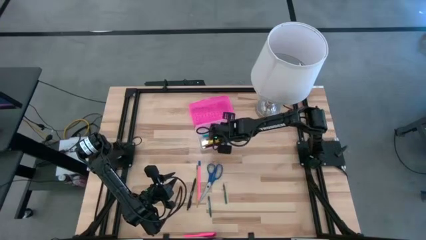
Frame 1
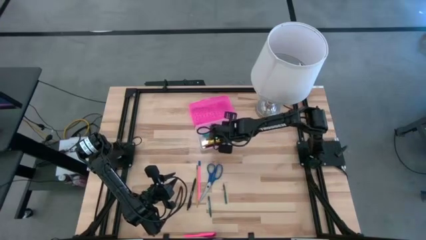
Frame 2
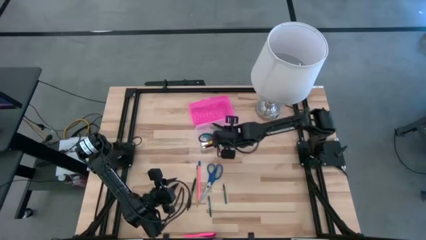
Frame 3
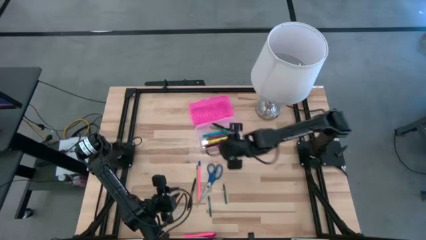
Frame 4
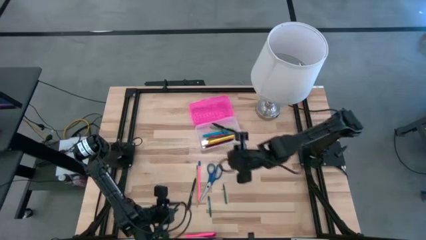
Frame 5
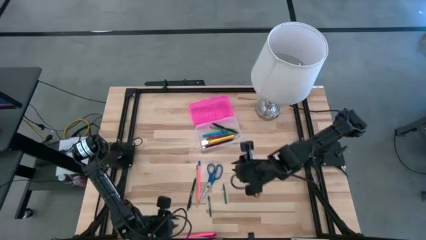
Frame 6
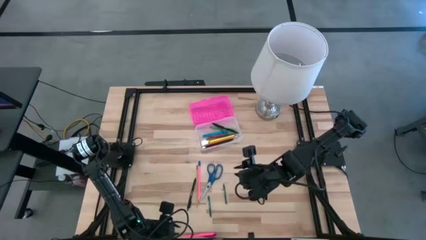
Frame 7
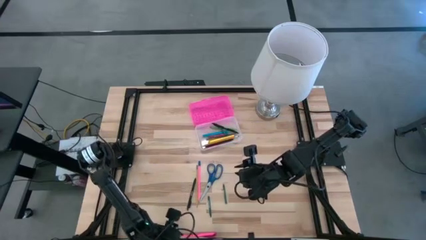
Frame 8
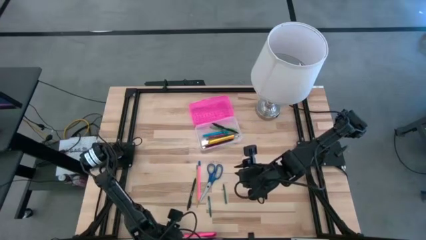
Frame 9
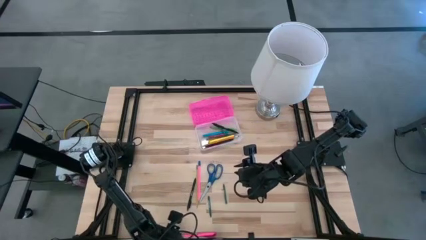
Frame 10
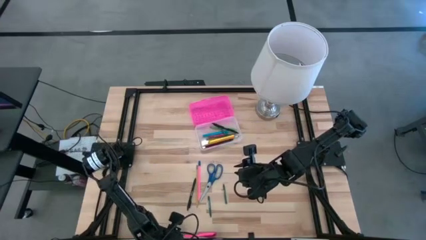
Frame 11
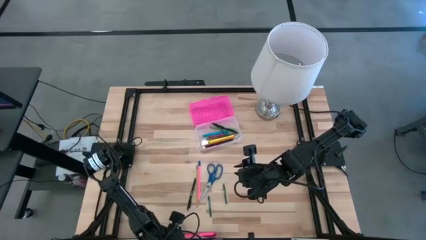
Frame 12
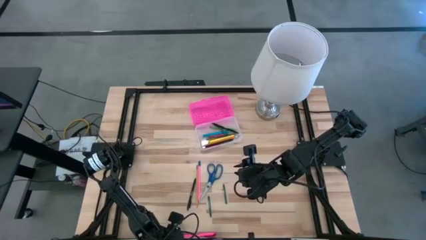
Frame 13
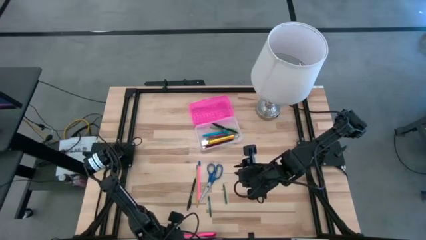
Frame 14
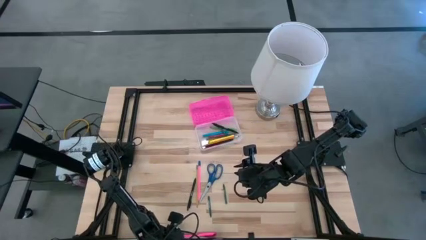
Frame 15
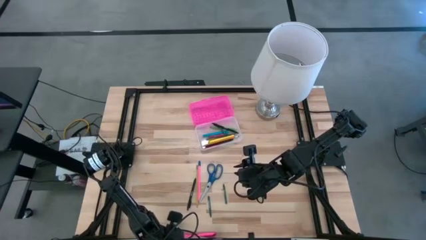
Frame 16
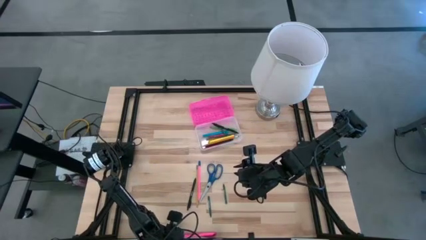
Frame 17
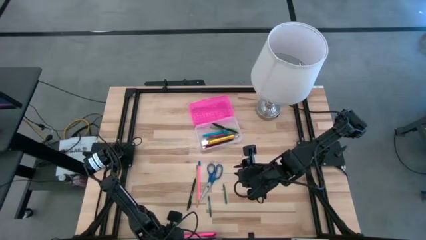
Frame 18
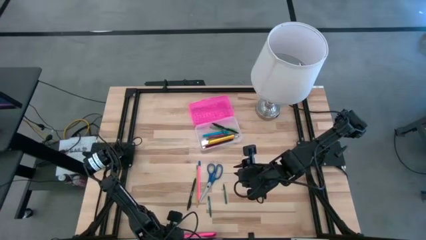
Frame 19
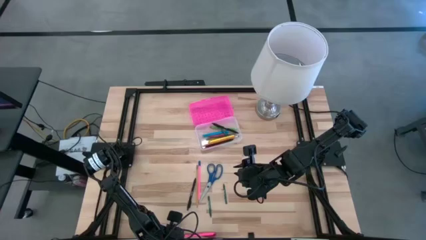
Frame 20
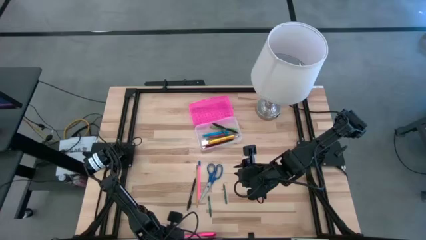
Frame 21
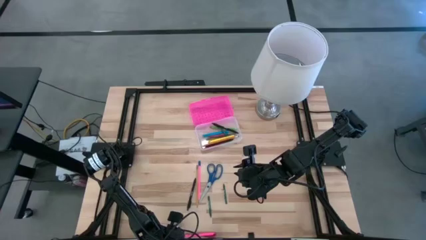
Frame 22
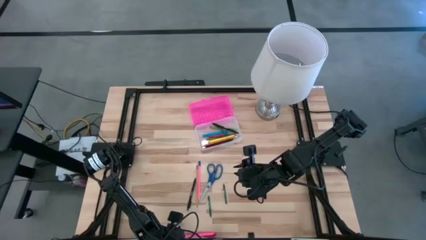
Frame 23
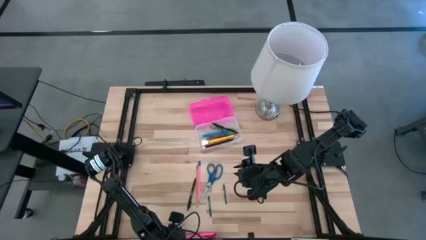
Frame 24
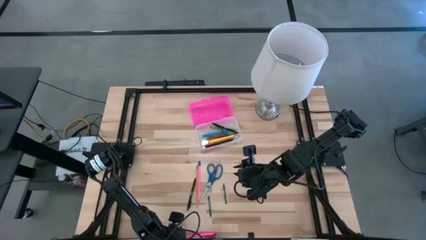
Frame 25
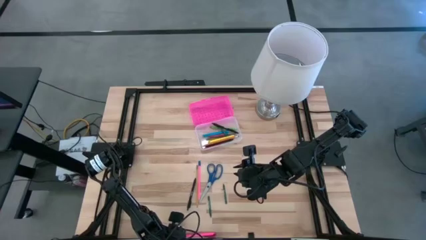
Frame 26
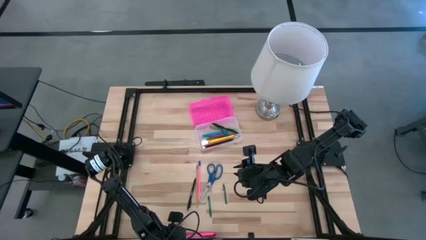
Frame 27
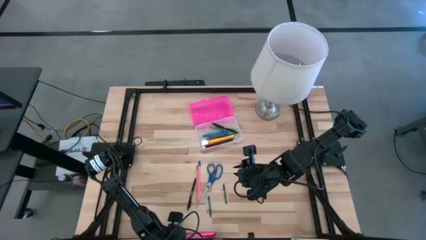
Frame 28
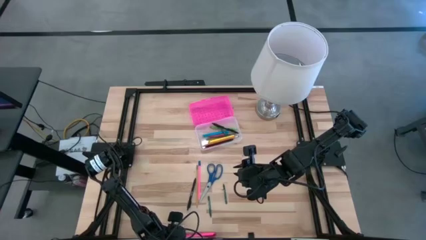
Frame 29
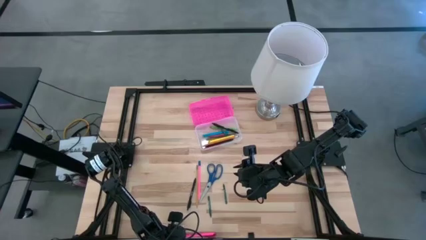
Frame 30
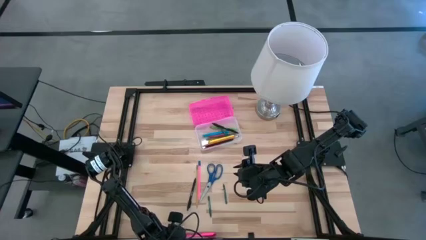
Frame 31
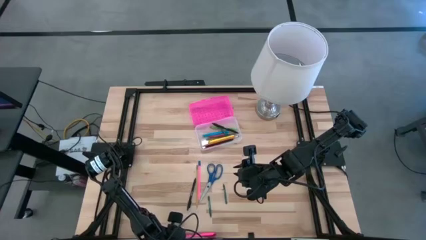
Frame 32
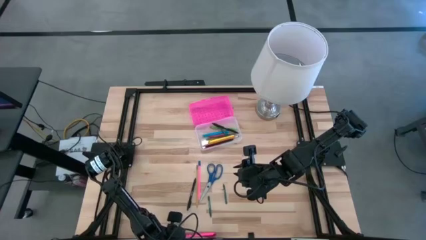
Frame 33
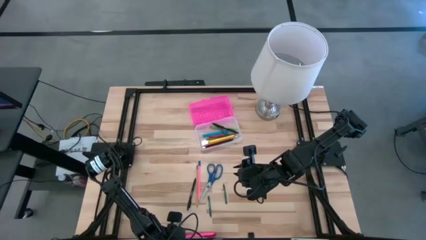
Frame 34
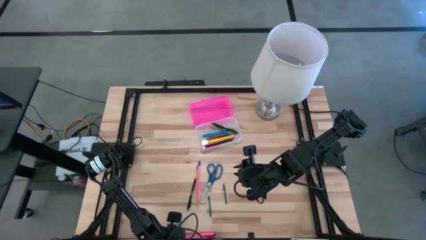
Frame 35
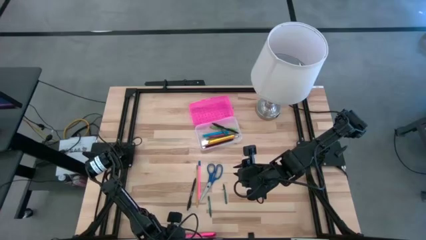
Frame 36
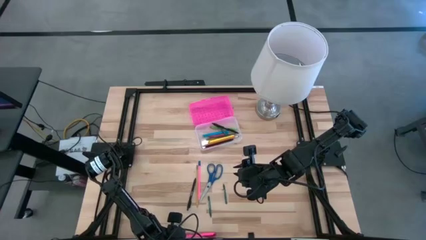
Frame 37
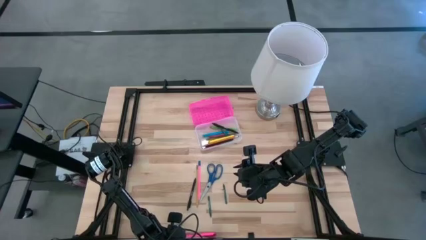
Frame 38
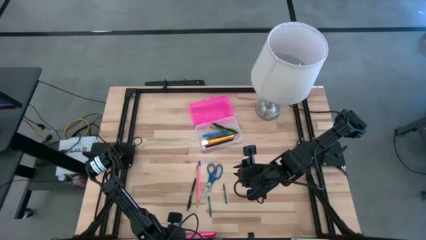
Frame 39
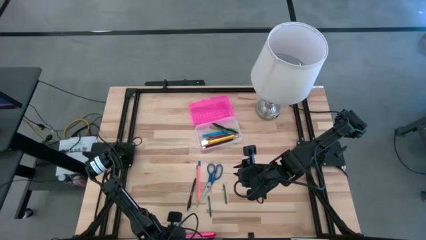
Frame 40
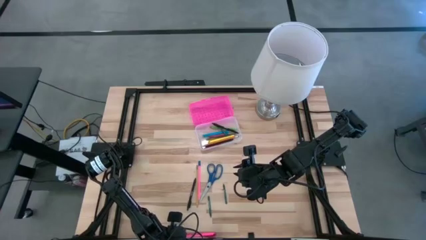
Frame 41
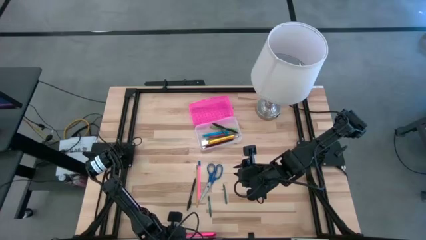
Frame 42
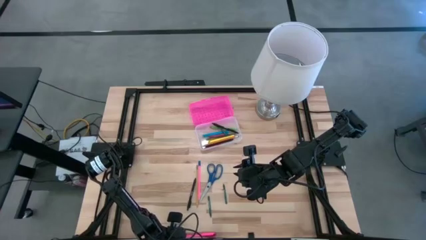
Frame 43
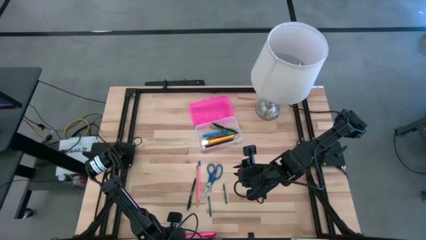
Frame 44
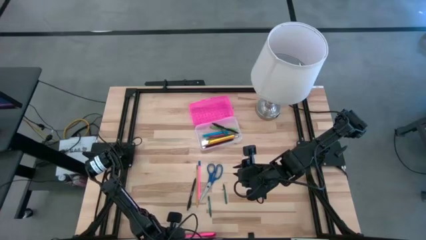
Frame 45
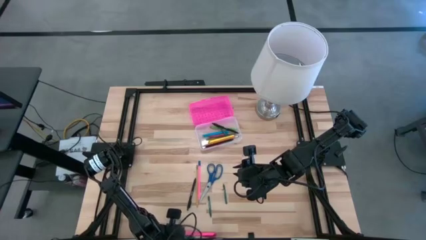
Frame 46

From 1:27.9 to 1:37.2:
Task: Pick & place school supplies into a supply box
Put the green crayon into the pink supply box

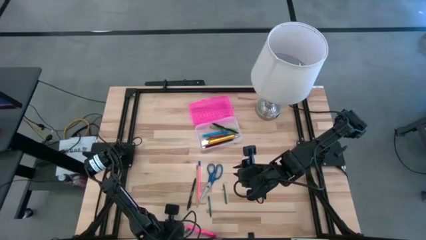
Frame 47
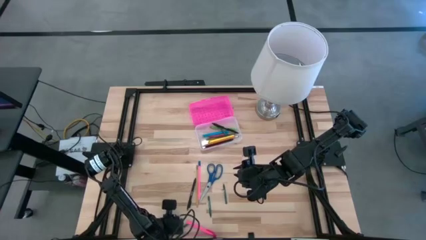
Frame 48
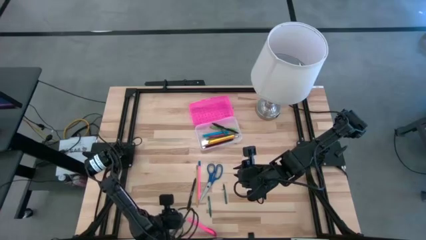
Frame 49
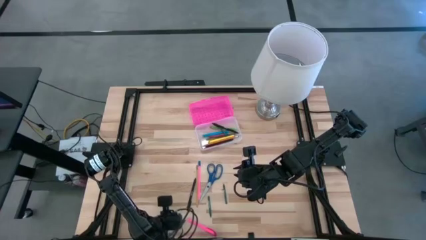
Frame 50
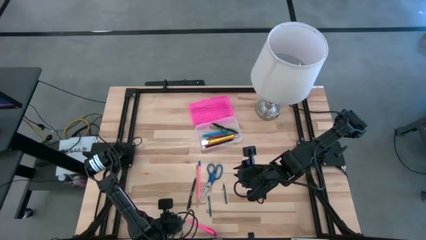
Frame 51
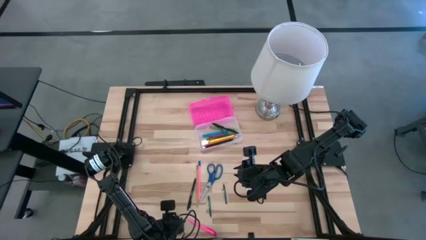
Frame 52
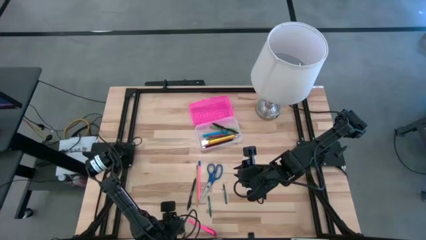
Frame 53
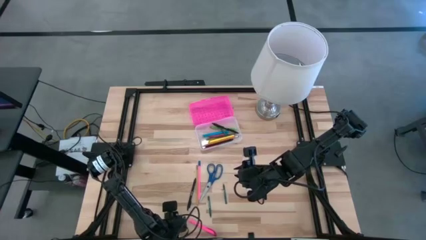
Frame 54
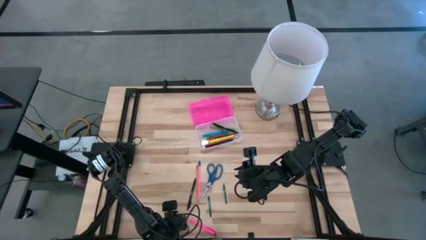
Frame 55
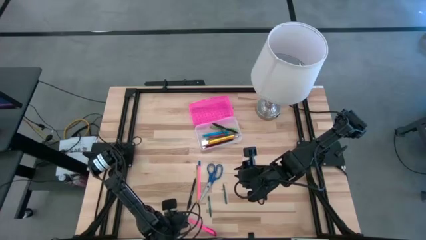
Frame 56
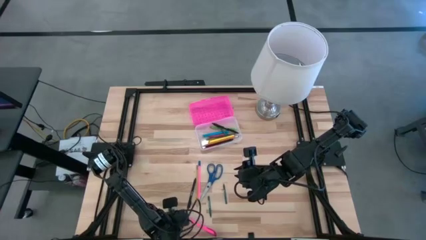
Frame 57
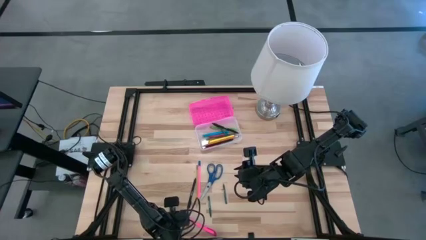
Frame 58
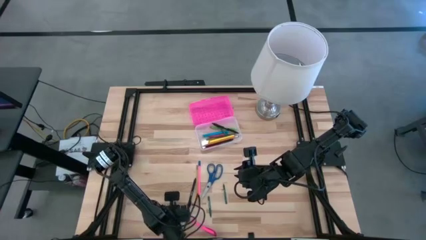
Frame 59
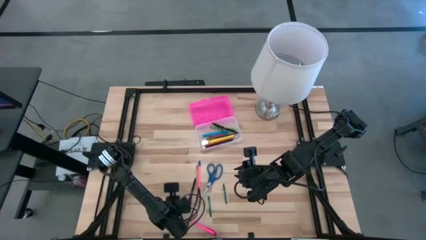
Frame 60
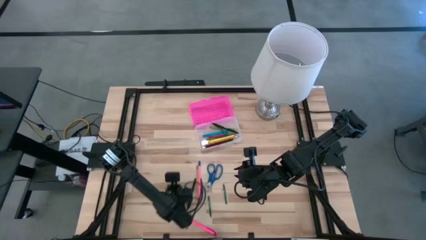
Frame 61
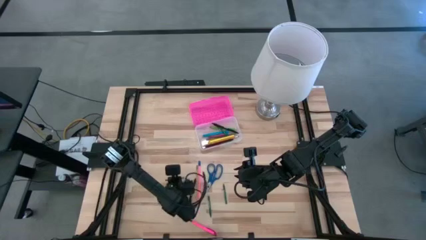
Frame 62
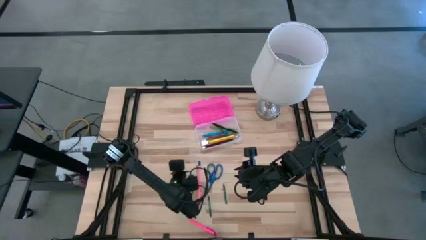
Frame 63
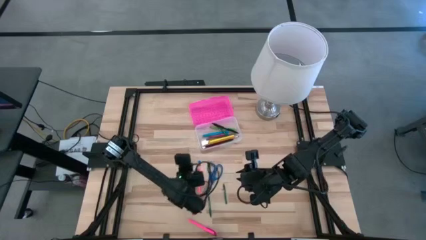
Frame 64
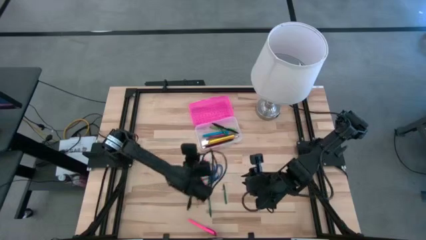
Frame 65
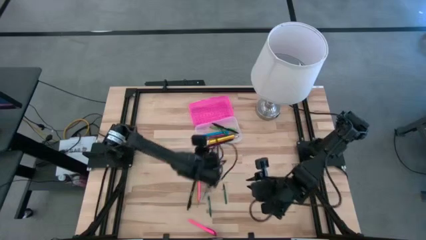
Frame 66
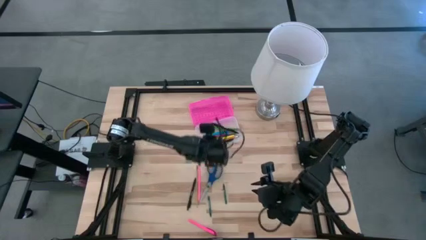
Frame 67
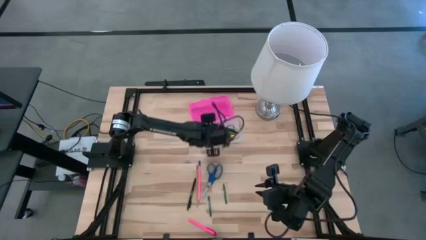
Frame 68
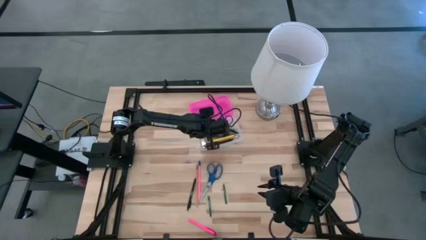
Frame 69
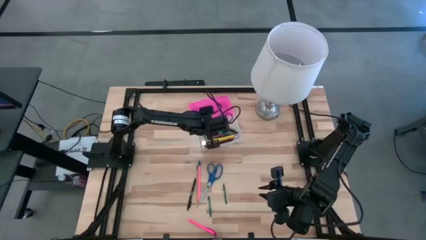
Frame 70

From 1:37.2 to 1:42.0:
Put the green crayon into the pink supply box
